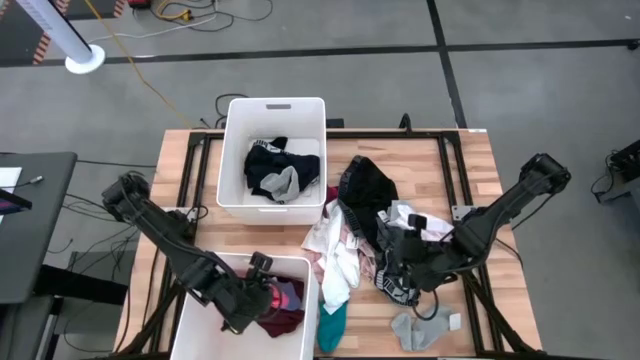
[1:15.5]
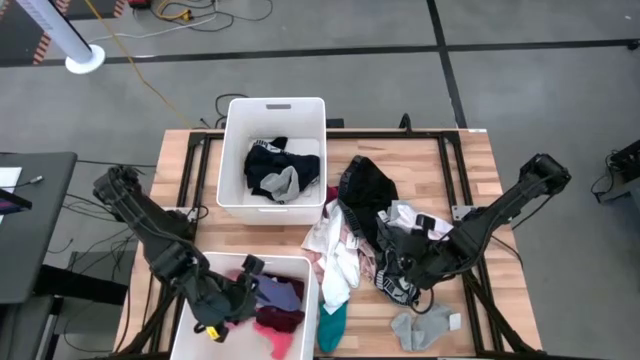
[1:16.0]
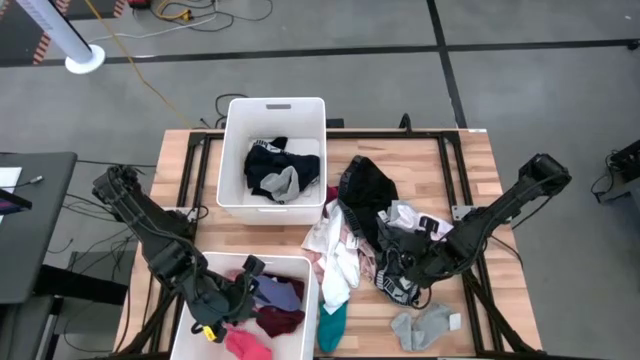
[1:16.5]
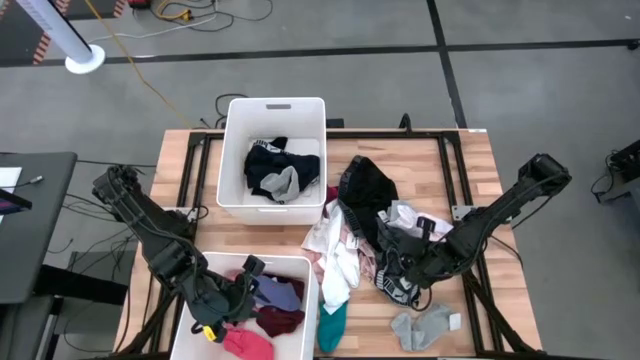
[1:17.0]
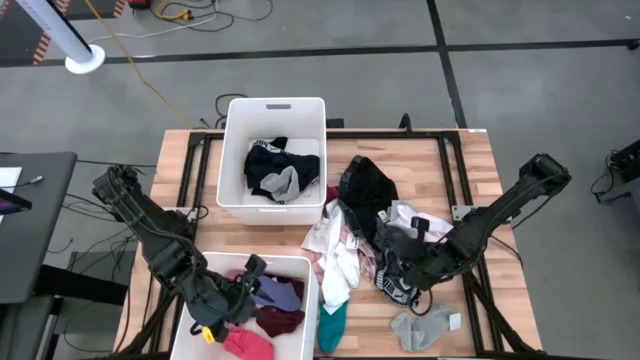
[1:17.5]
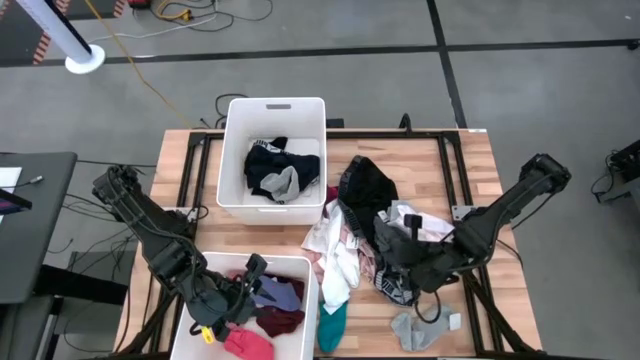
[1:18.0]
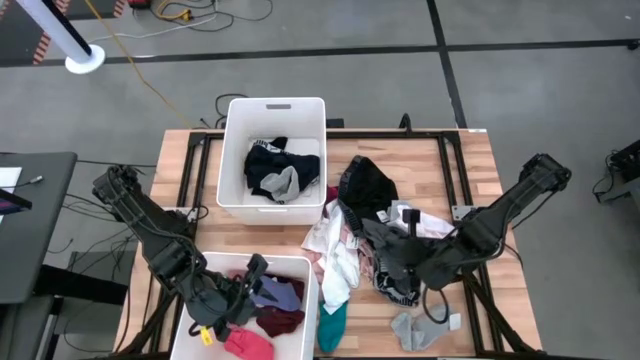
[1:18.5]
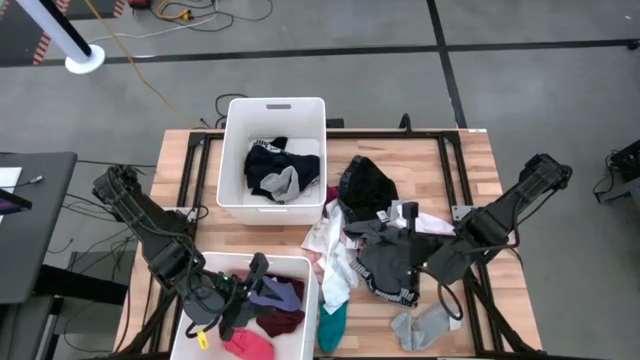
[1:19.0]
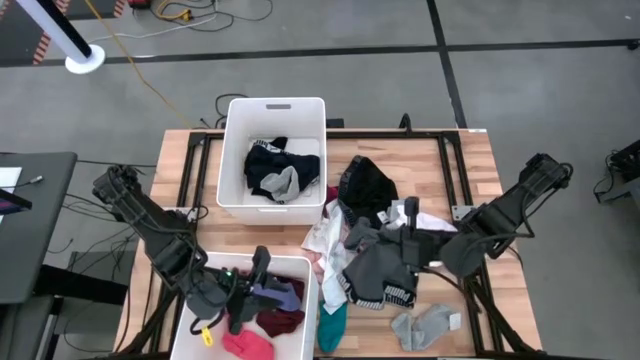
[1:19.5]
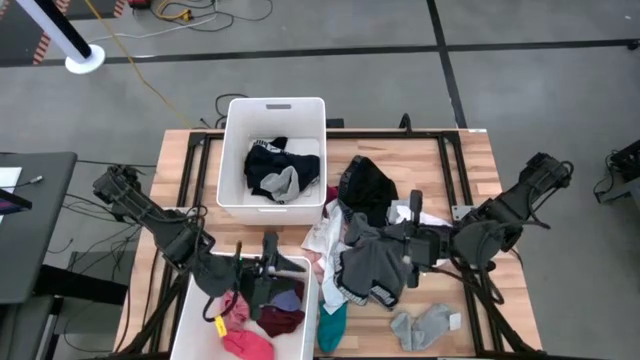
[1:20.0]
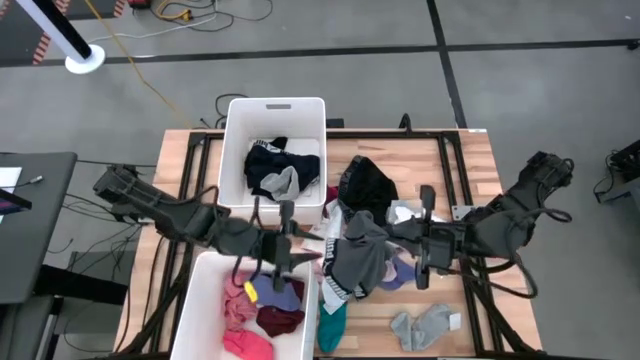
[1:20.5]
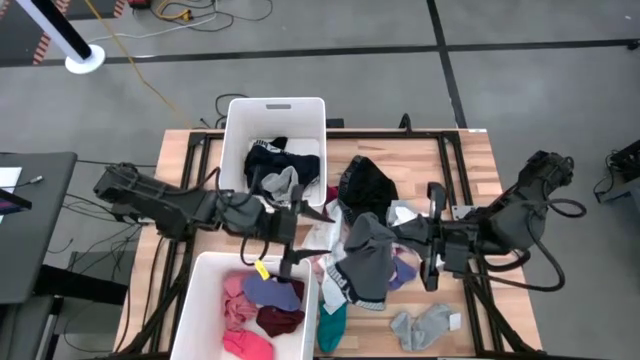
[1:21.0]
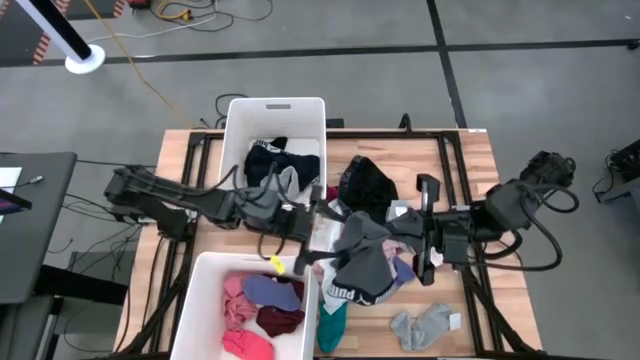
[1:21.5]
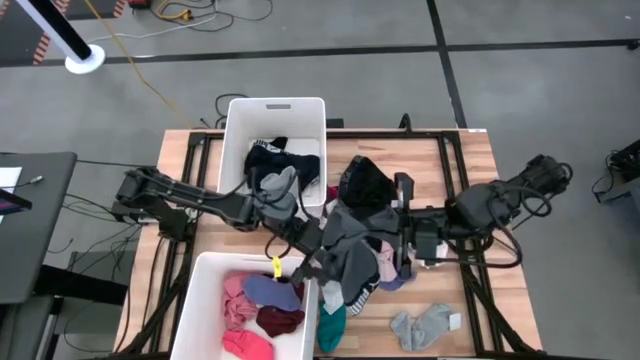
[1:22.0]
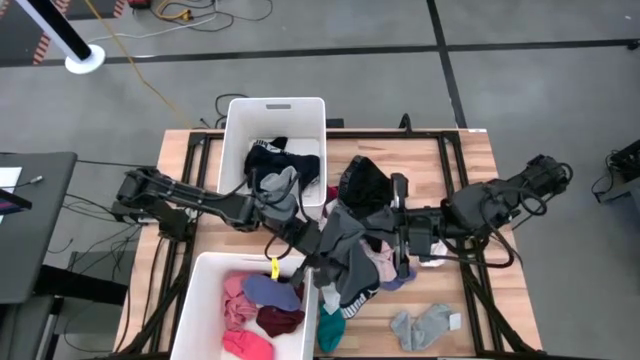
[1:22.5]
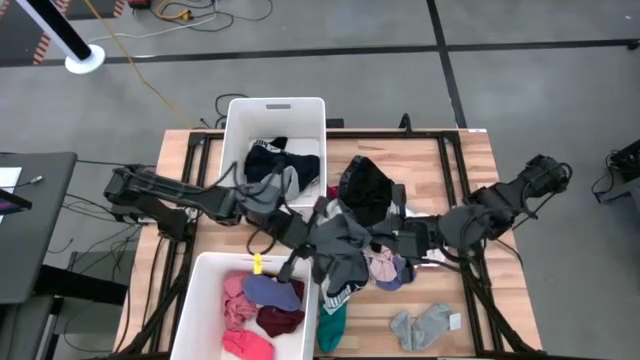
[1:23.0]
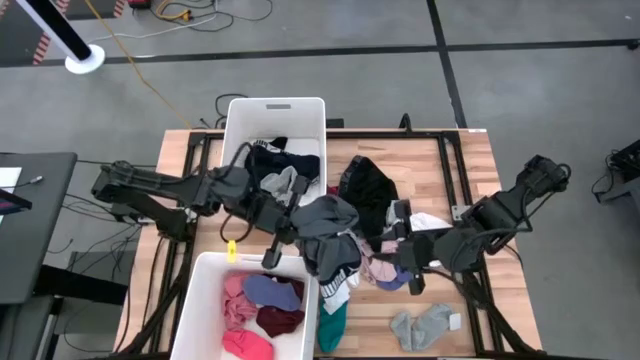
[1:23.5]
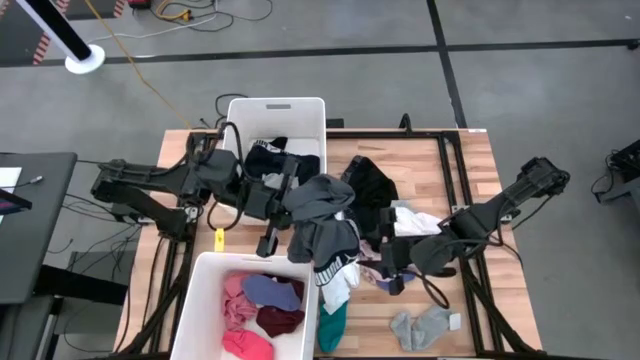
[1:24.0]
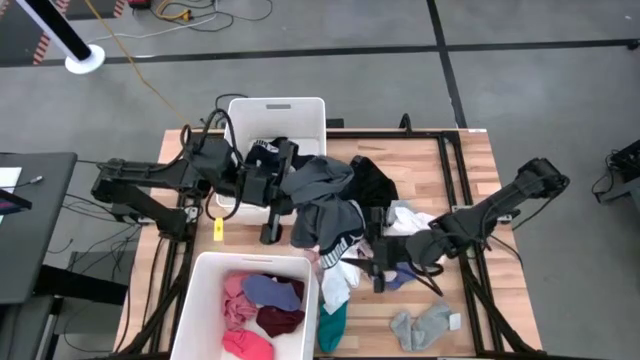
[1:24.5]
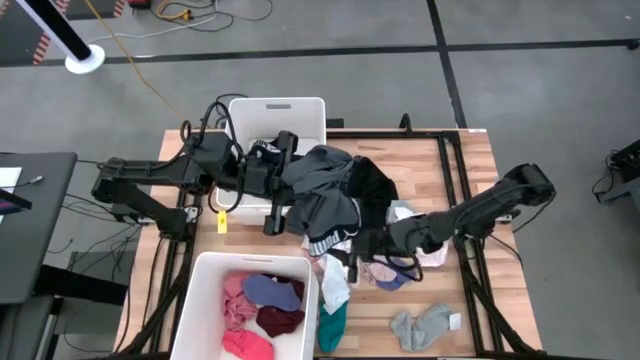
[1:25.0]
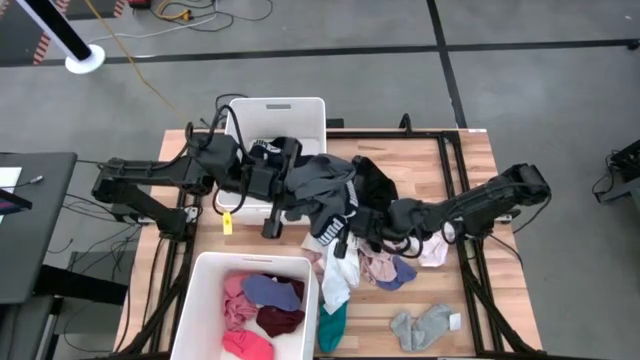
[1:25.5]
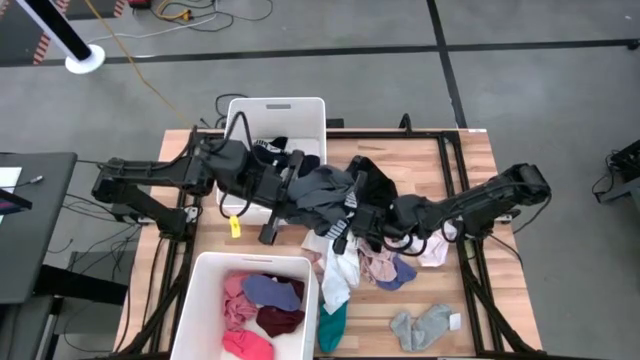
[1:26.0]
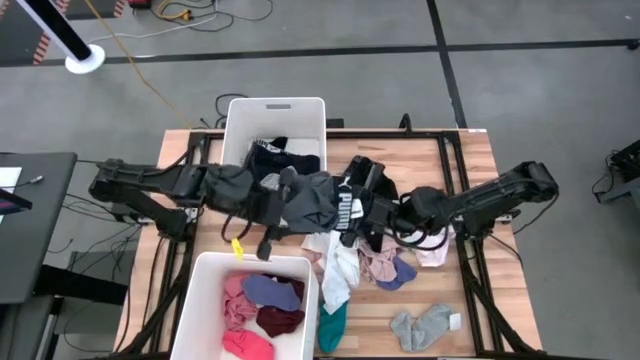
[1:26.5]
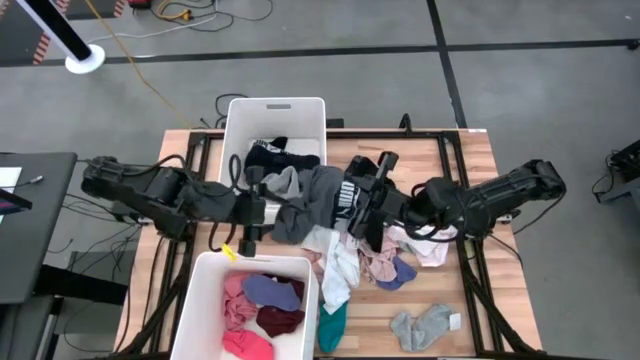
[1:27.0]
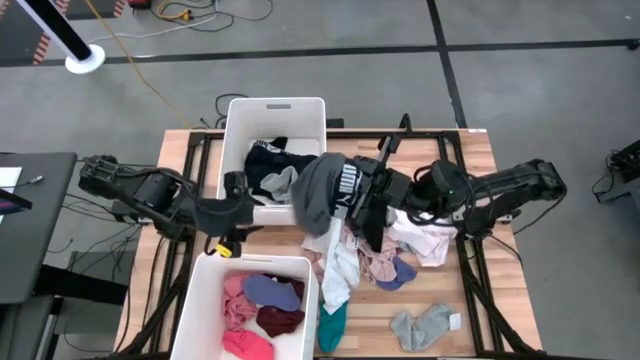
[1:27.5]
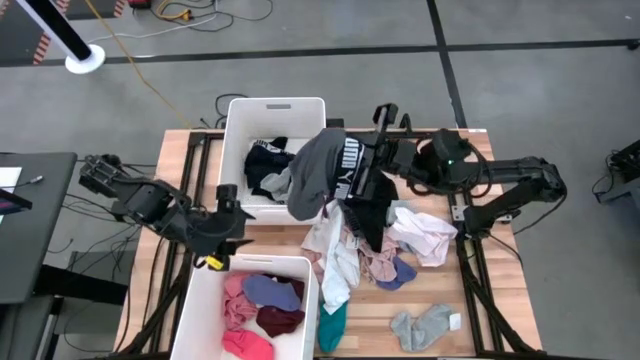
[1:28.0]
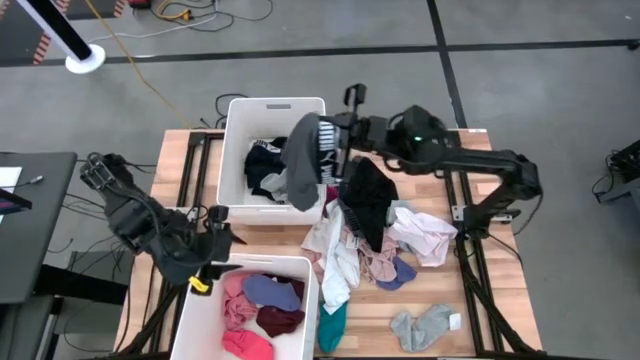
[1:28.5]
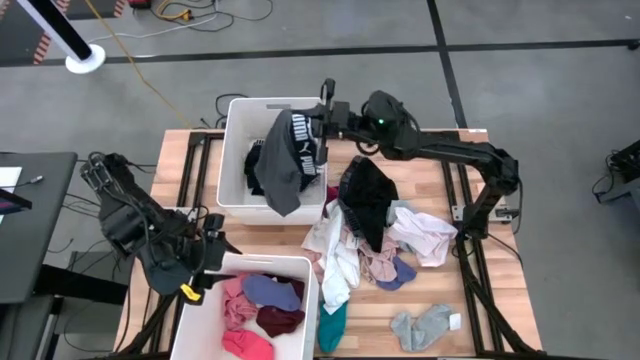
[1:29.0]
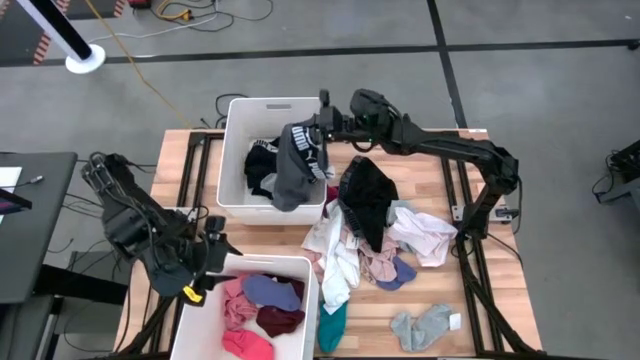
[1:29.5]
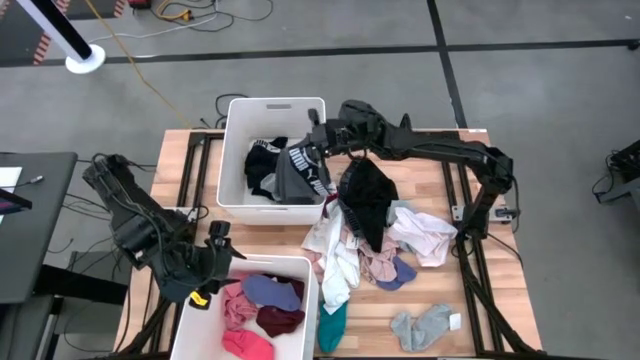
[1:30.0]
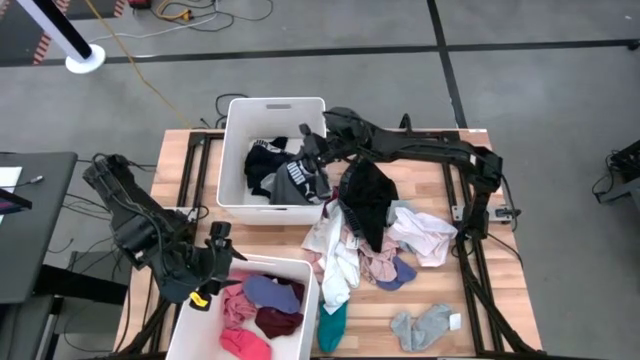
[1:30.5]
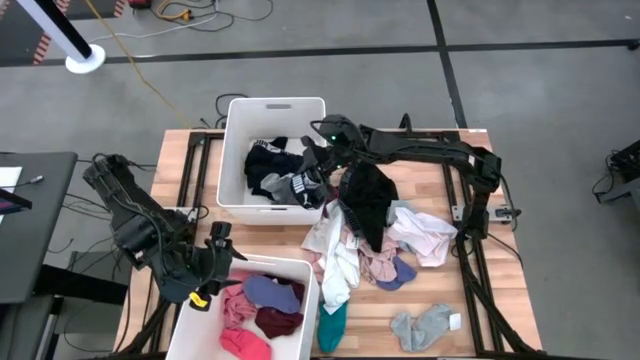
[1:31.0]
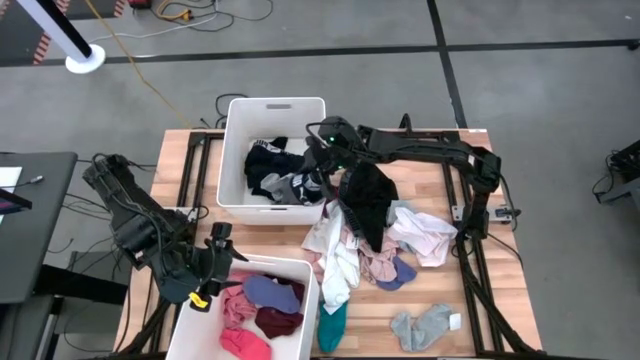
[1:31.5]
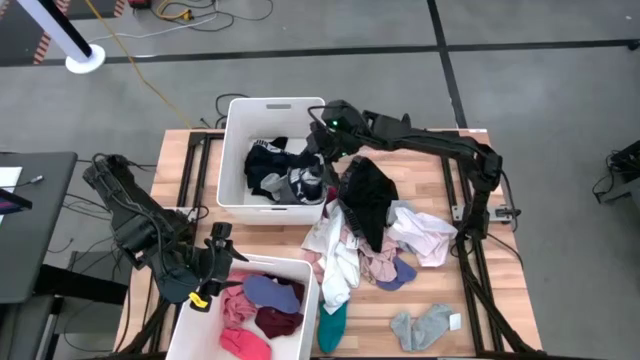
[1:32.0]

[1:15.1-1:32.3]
Task: Sort clothes
Put the gray underwear into the top white laundry bin
